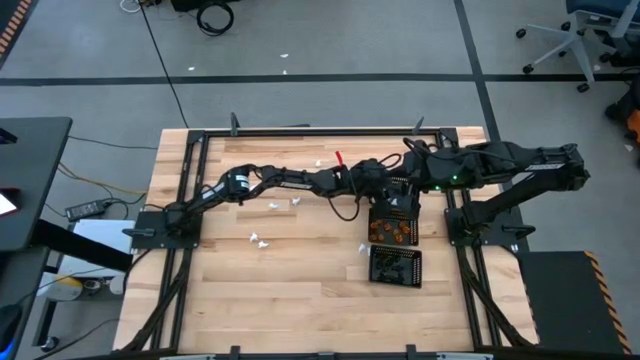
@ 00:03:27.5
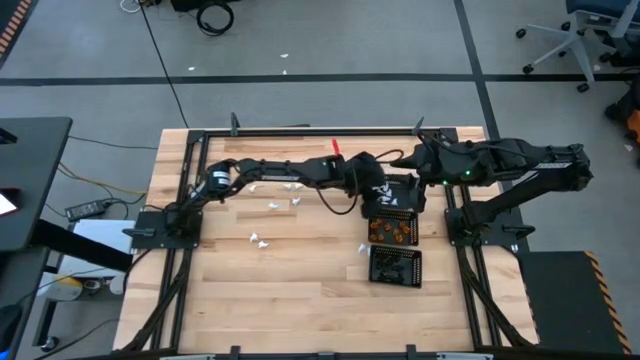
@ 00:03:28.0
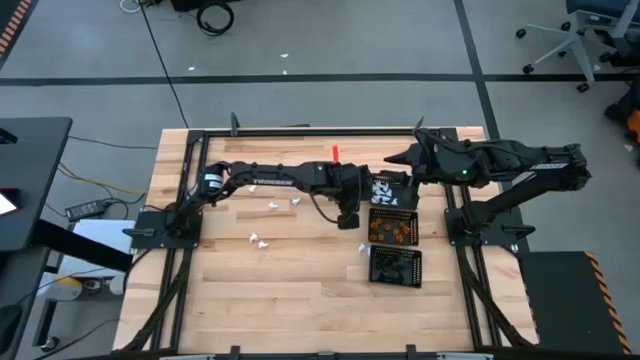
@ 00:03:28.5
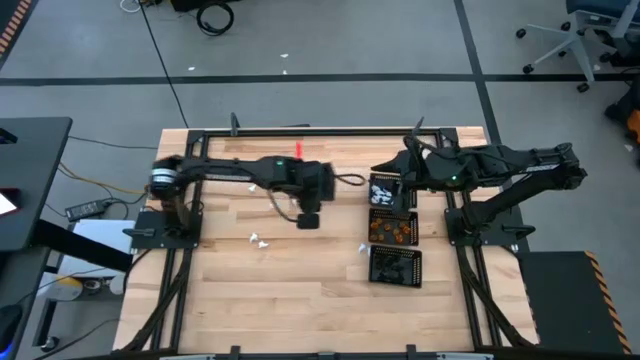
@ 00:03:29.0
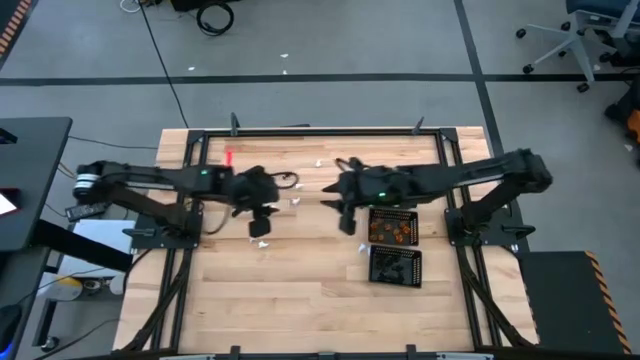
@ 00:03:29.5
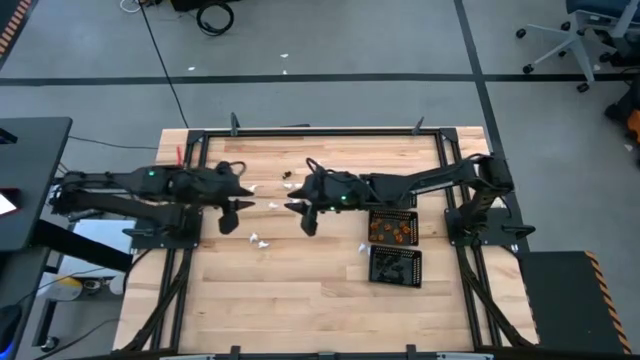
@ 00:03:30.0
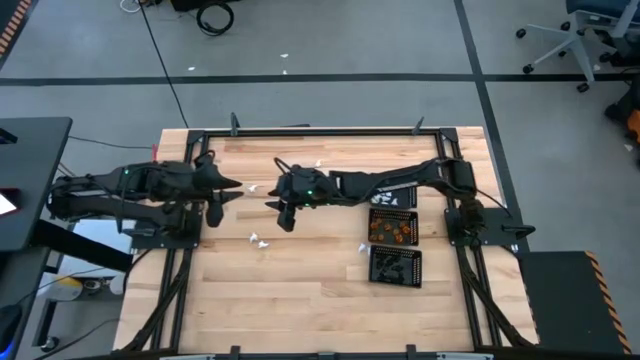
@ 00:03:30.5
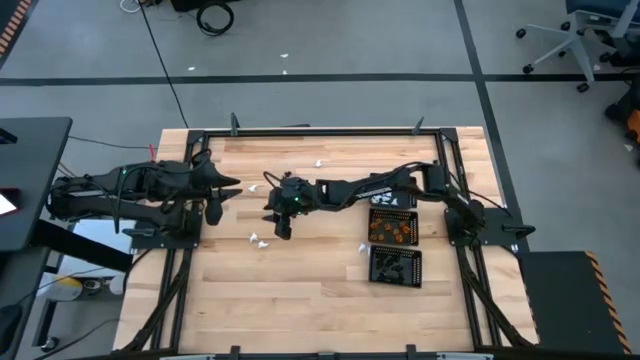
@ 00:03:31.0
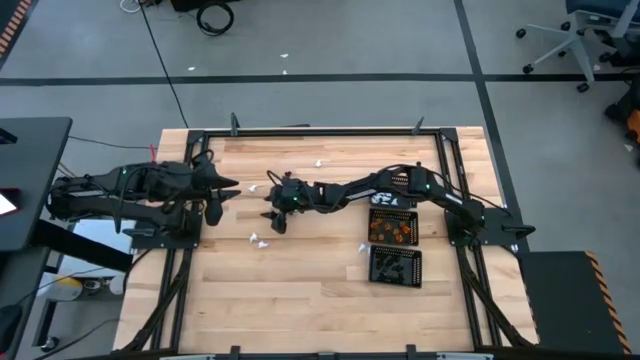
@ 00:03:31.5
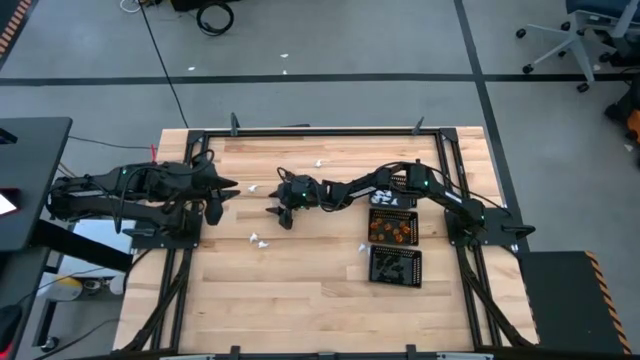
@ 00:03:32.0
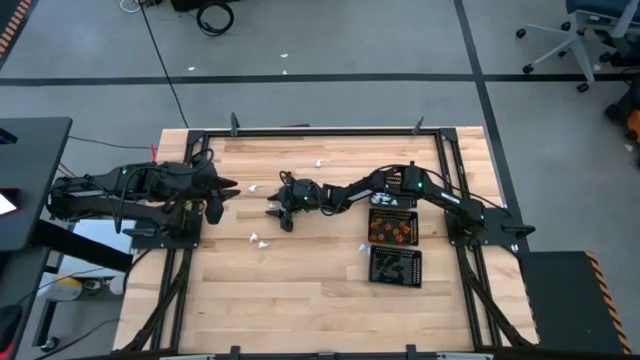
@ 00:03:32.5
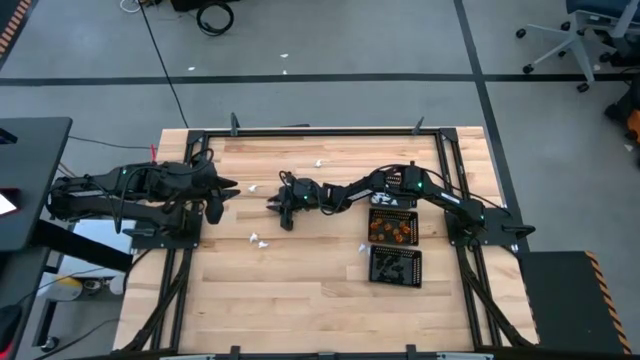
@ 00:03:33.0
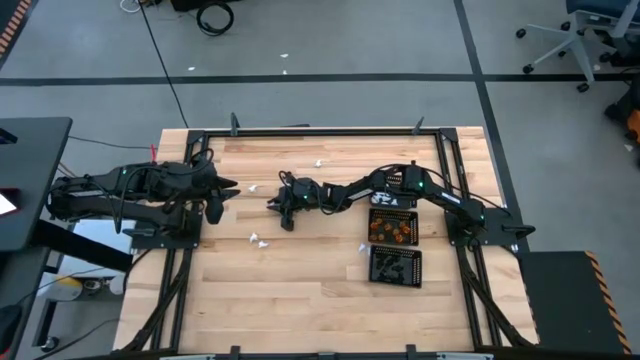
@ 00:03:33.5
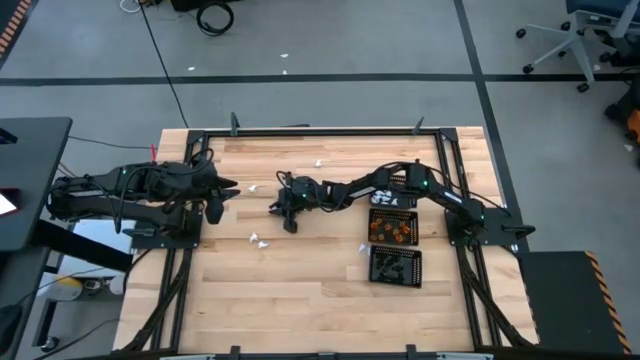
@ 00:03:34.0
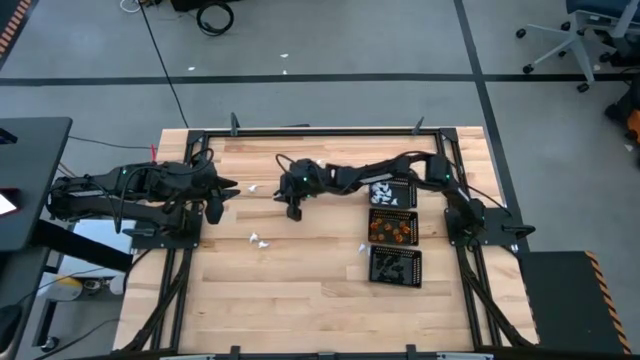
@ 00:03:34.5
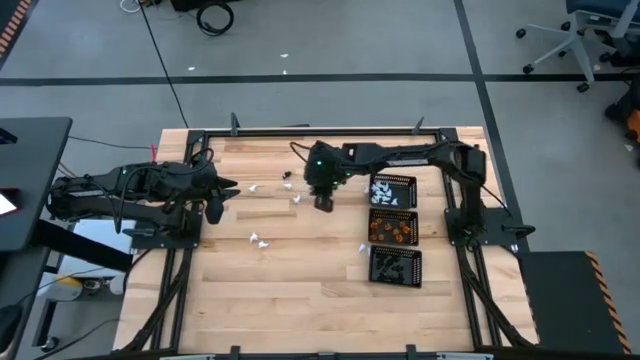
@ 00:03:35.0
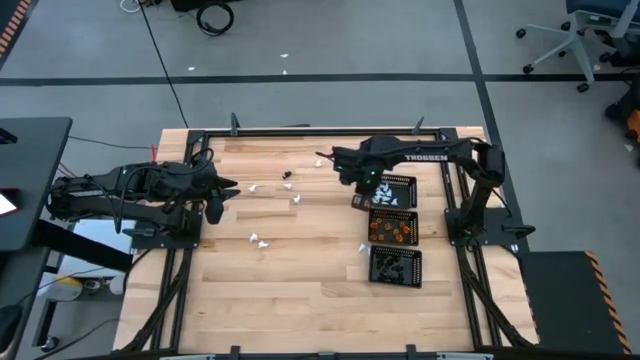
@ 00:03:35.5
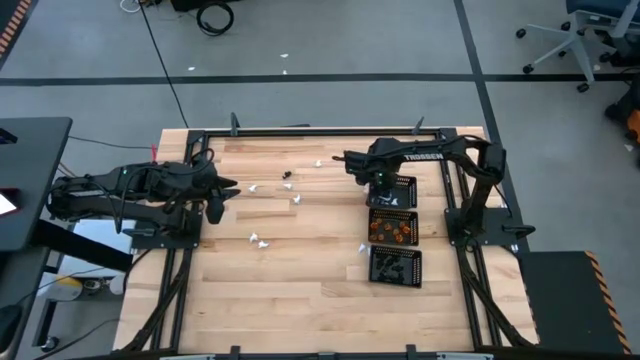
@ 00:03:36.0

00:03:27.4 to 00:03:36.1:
Task: Sort Halloween decoration
Put the white ghost toy into the top right black bin

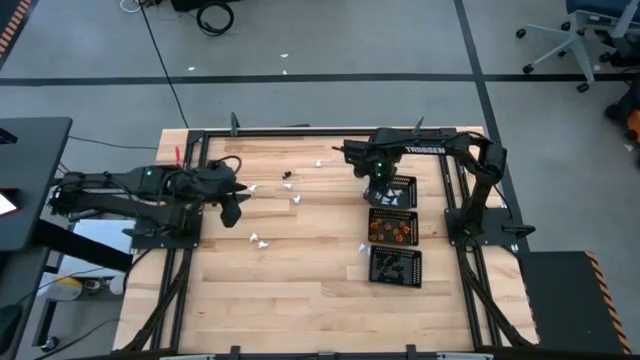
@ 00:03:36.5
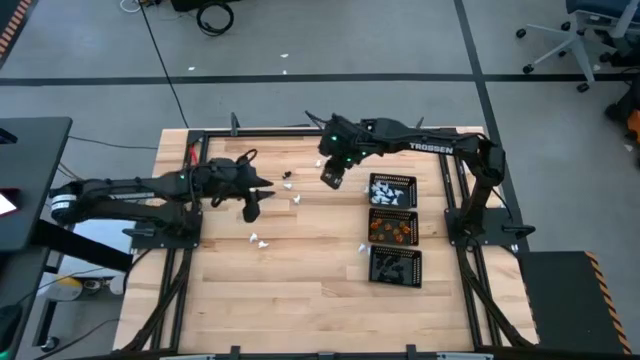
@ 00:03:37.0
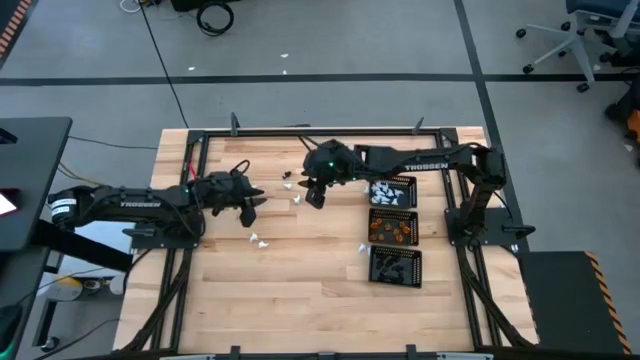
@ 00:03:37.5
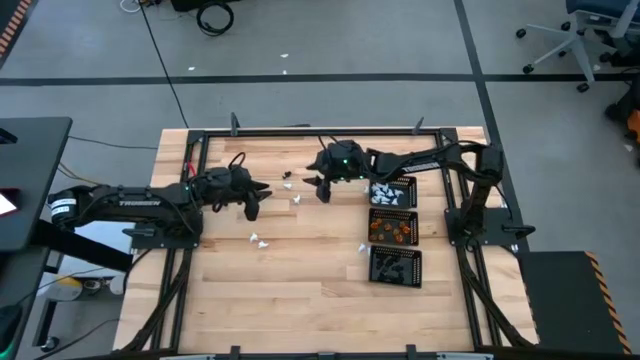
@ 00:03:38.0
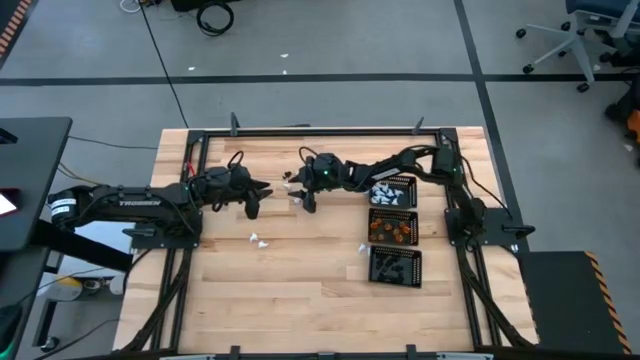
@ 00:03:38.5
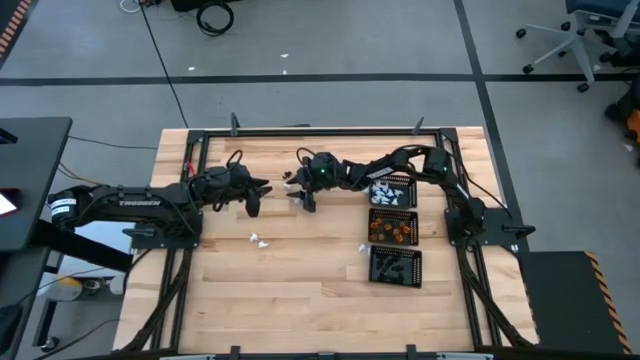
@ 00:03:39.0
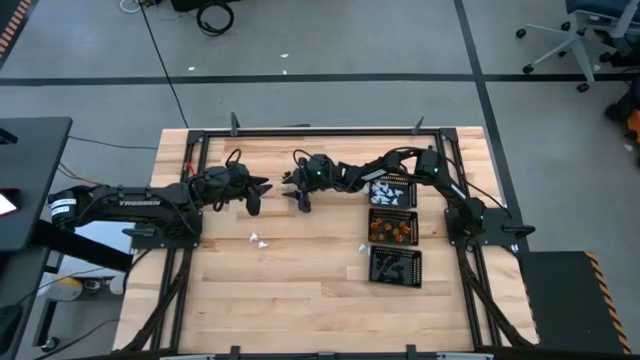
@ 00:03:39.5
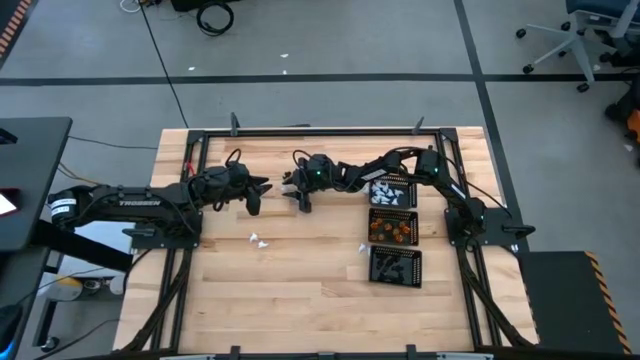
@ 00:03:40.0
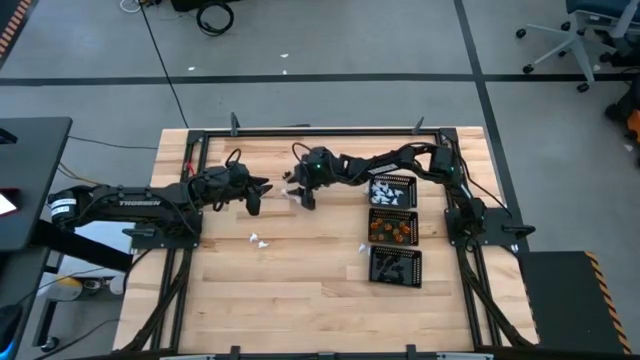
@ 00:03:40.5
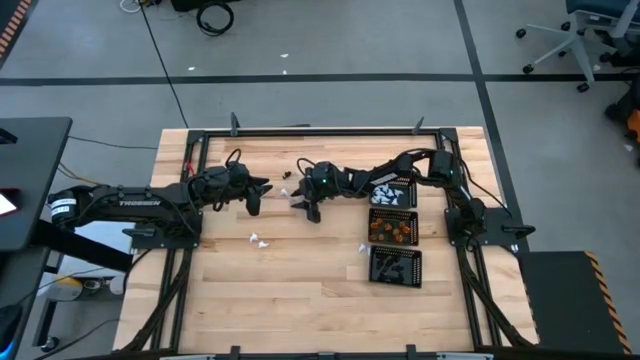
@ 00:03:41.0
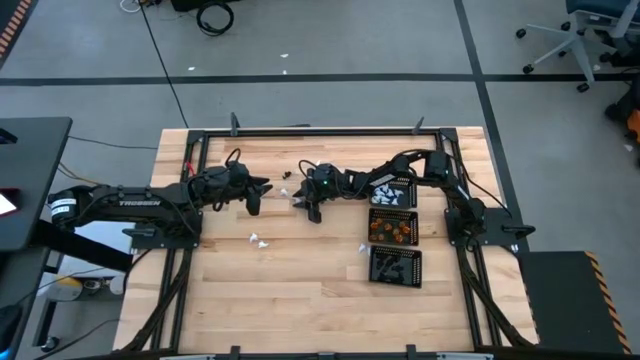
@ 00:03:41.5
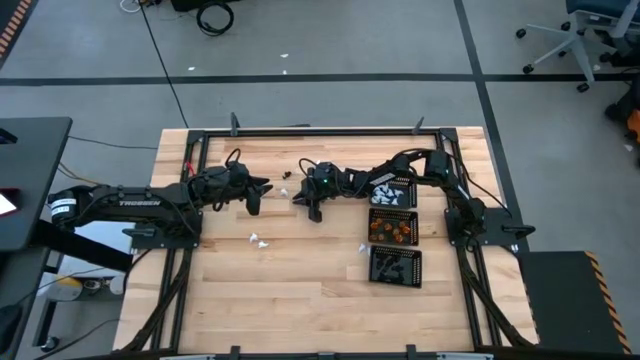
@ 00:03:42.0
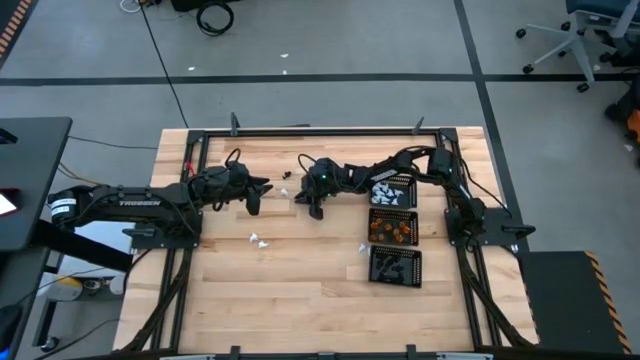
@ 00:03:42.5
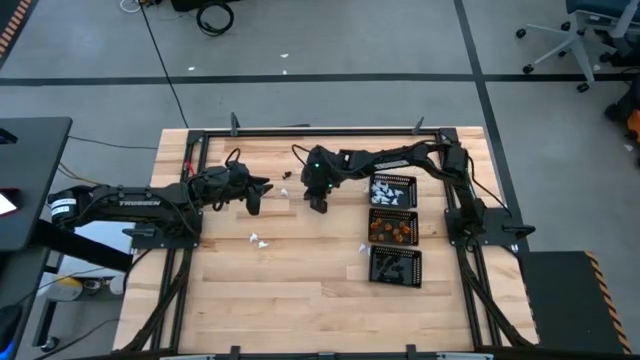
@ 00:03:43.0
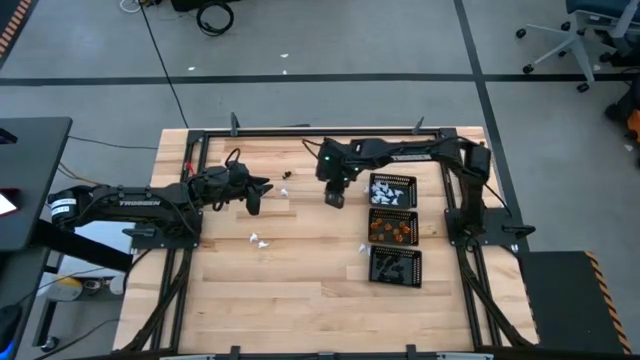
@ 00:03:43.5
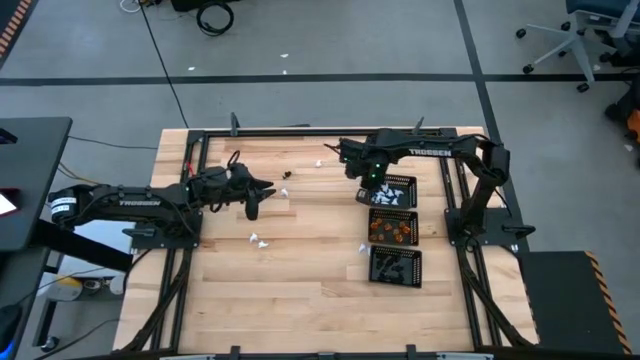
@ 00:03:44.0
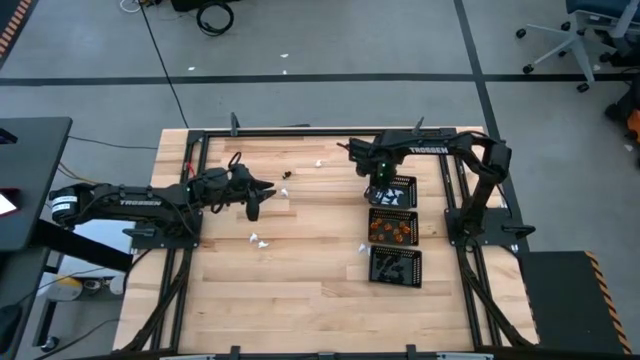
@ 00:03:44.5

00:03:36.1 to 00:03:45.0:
Put the white ghost toy into the top black bin

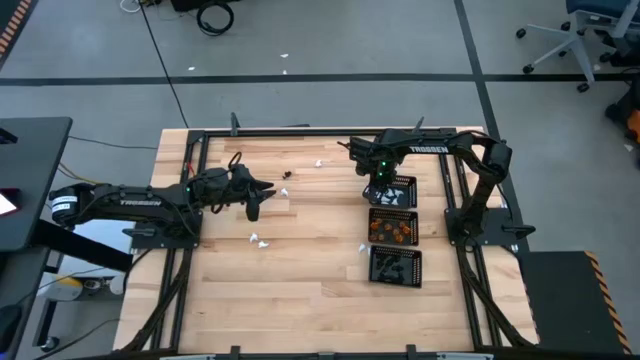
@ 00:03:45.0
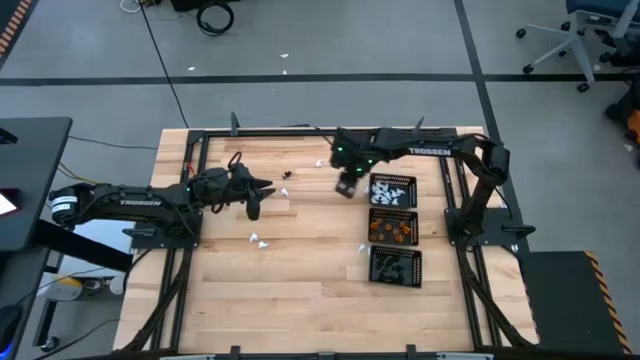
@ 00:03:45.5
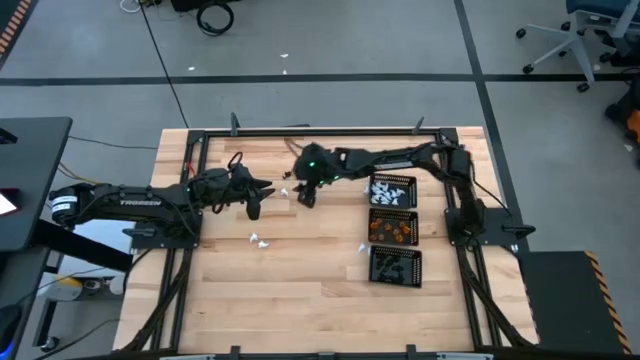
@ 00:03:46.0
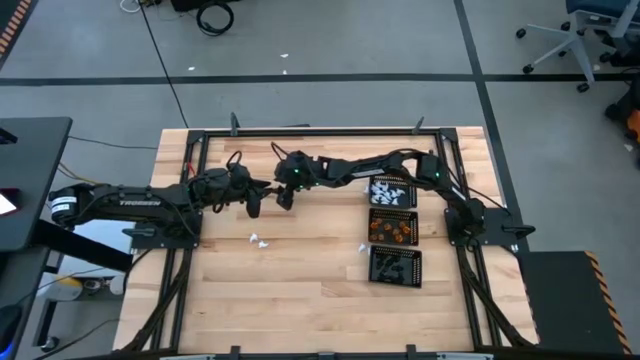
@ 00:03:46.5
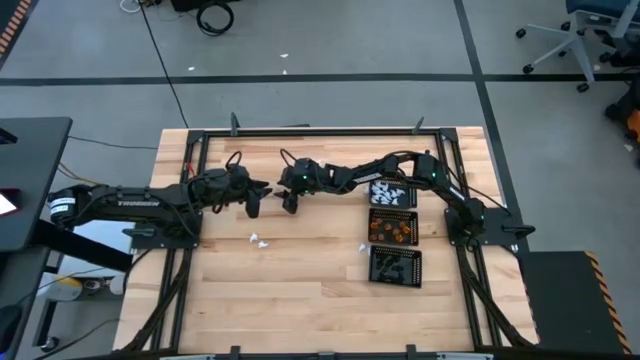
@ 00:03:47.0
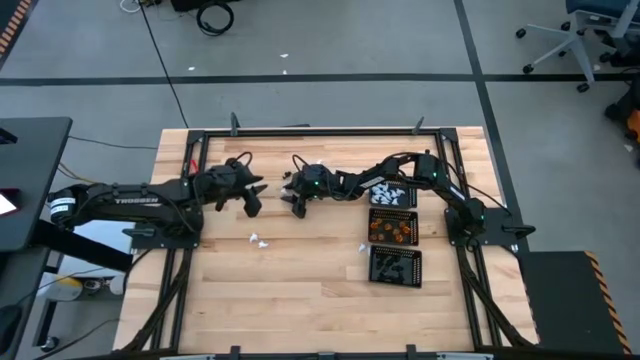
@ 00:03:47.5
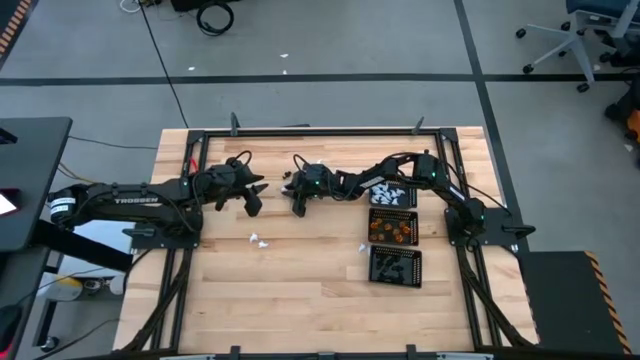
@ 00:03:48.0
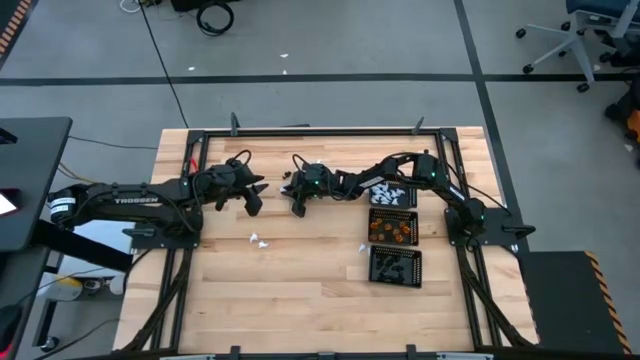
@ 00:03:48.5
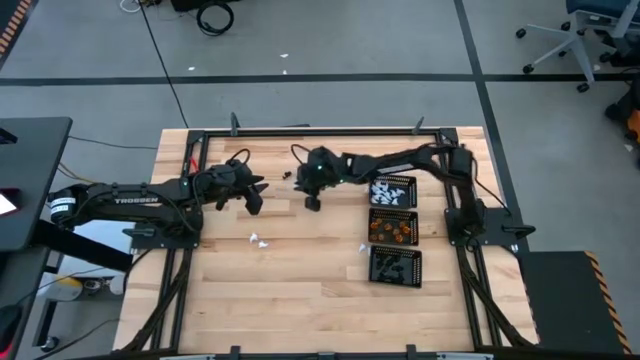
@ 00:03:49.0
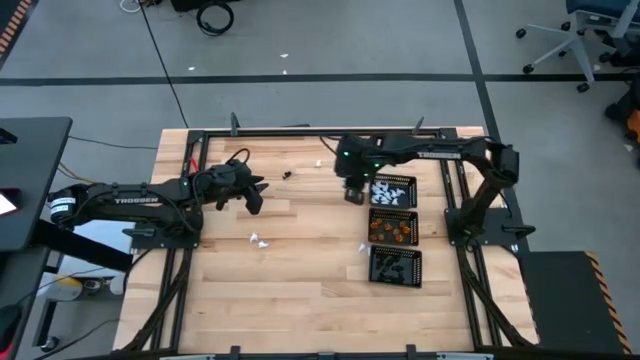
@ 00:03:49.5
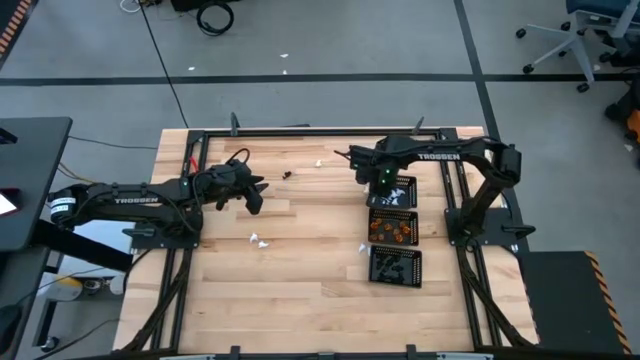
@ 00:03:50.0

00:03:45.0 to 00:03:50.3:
Put the white ghost toy into the top black bin
